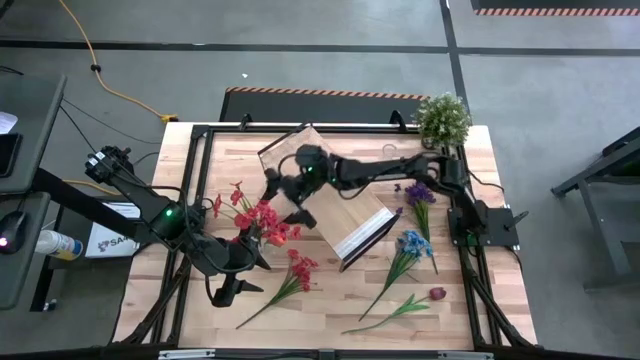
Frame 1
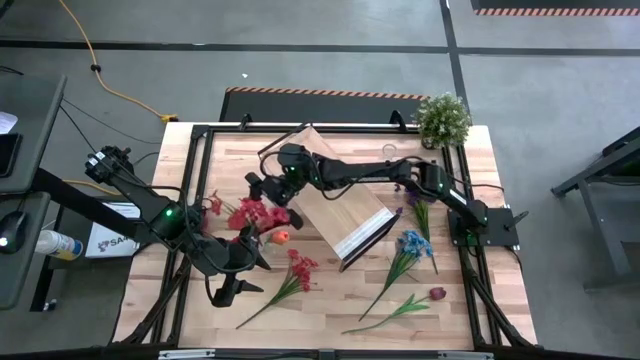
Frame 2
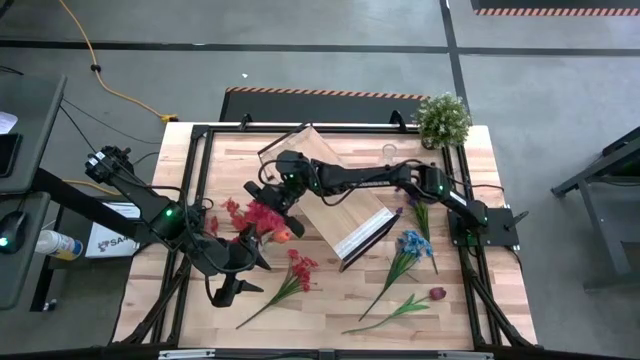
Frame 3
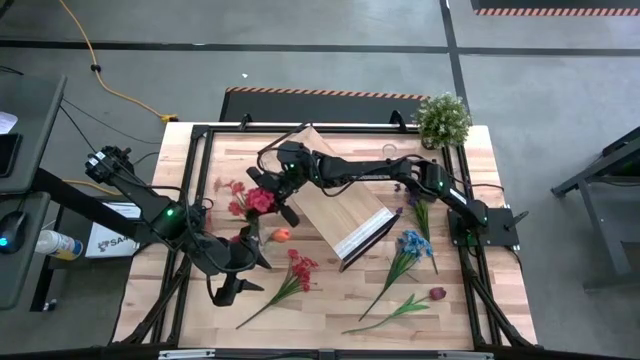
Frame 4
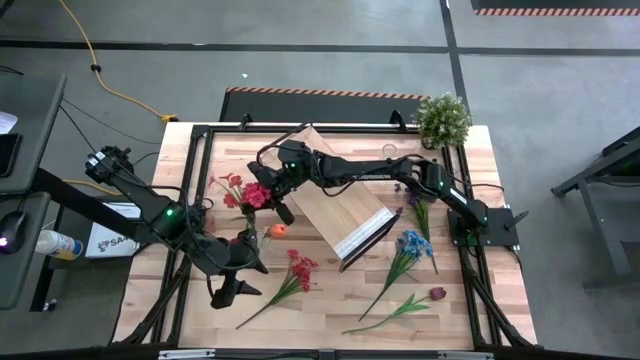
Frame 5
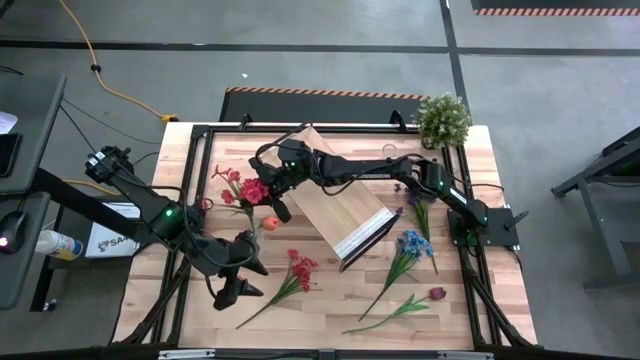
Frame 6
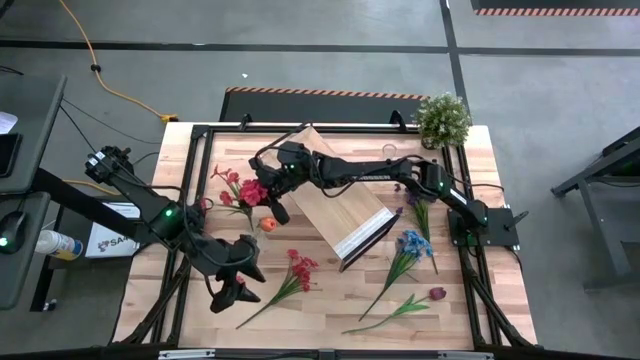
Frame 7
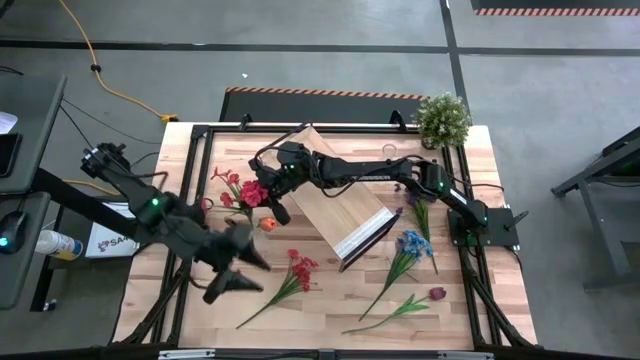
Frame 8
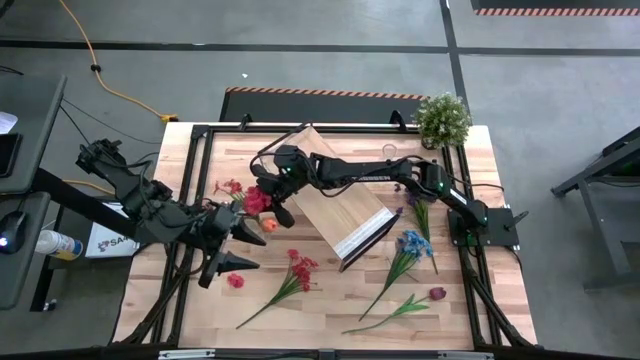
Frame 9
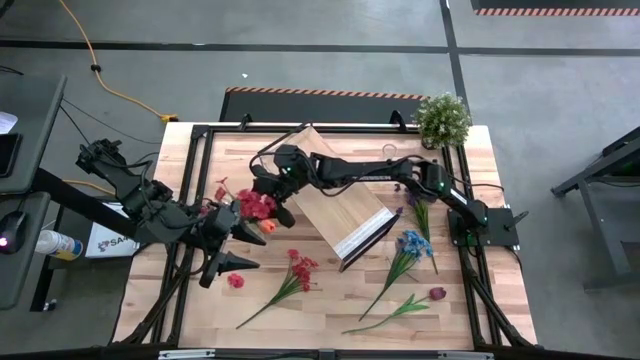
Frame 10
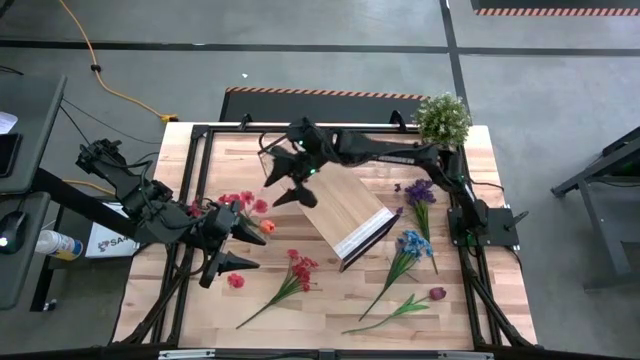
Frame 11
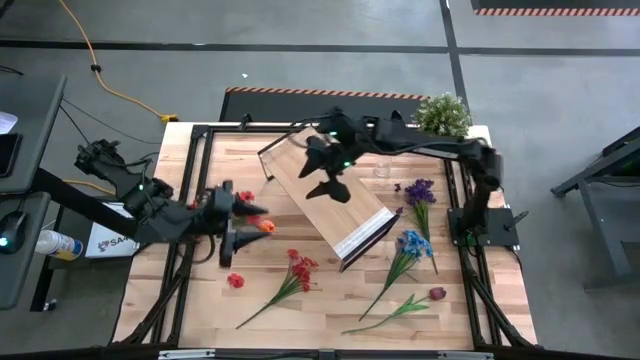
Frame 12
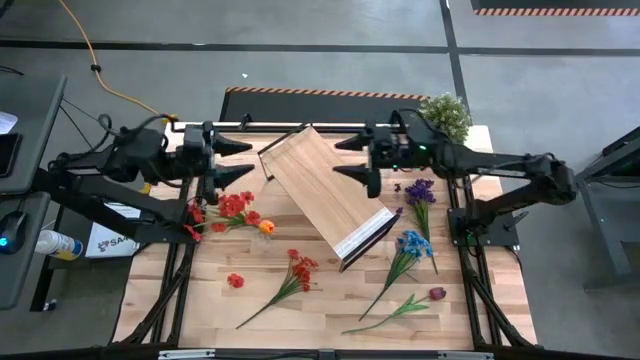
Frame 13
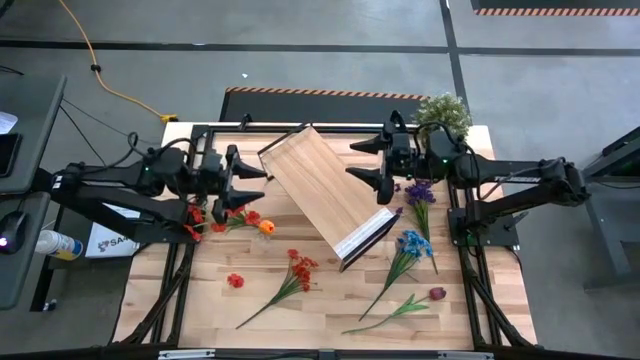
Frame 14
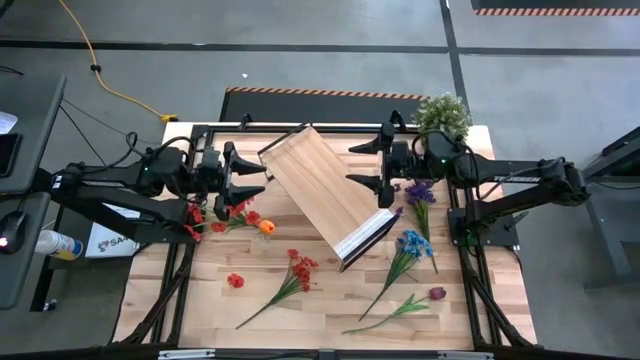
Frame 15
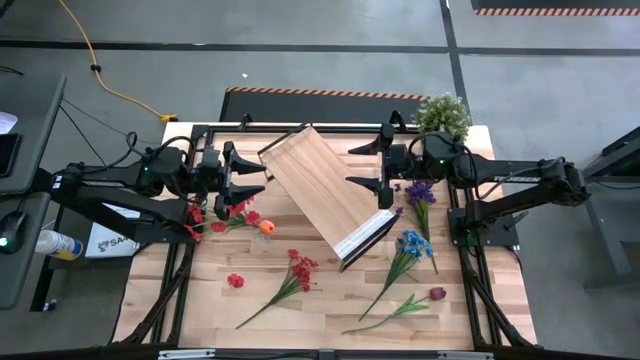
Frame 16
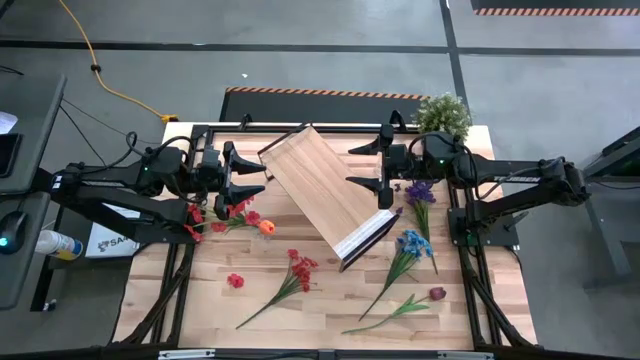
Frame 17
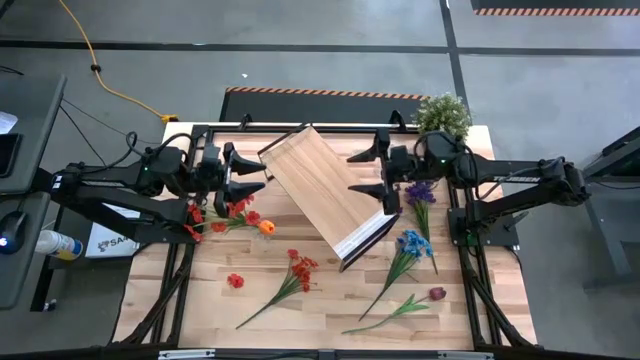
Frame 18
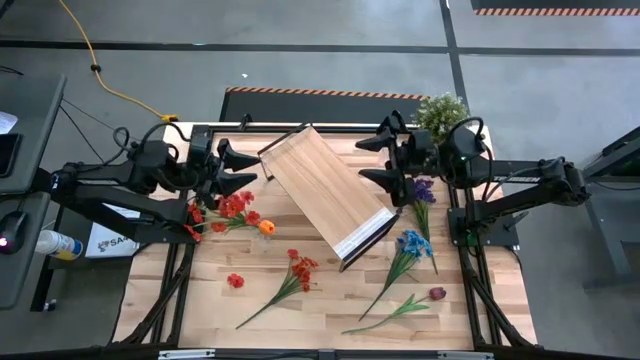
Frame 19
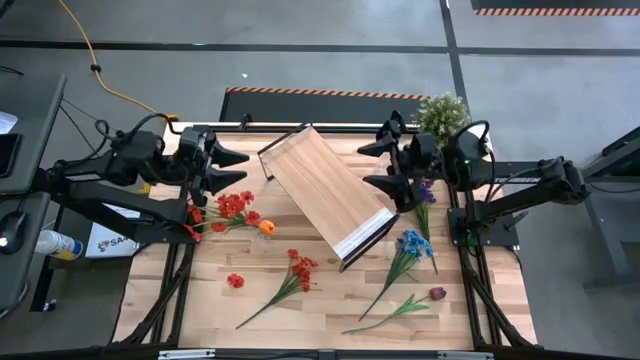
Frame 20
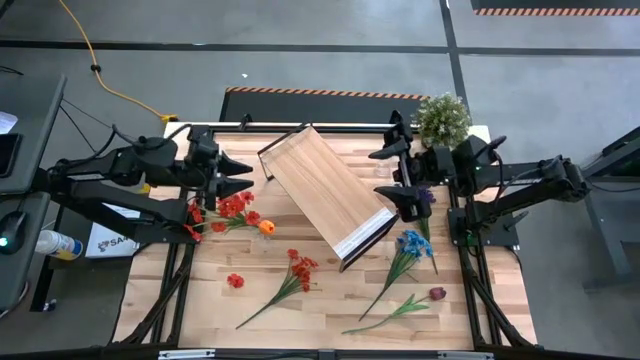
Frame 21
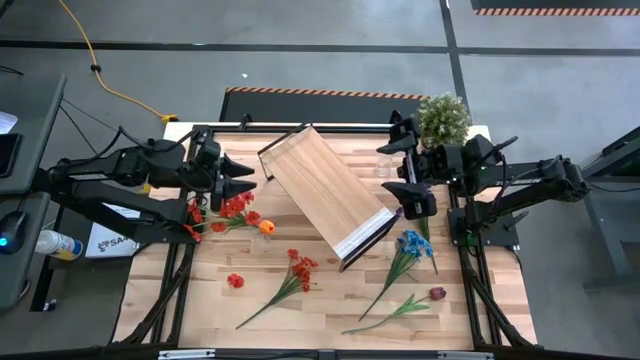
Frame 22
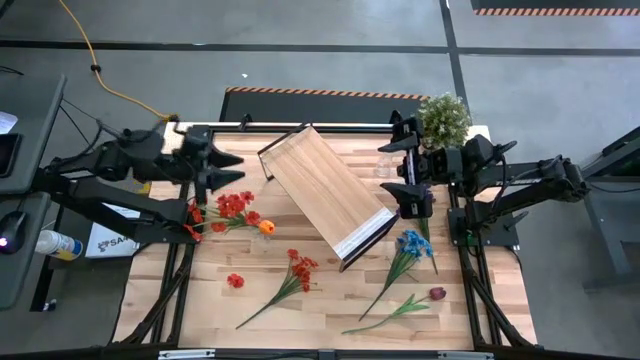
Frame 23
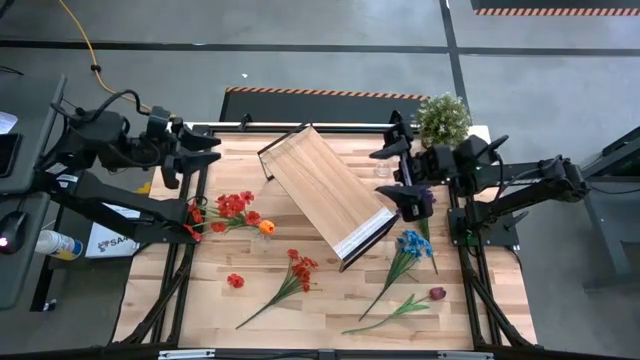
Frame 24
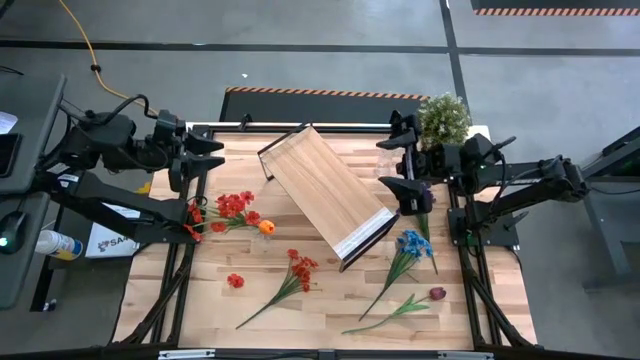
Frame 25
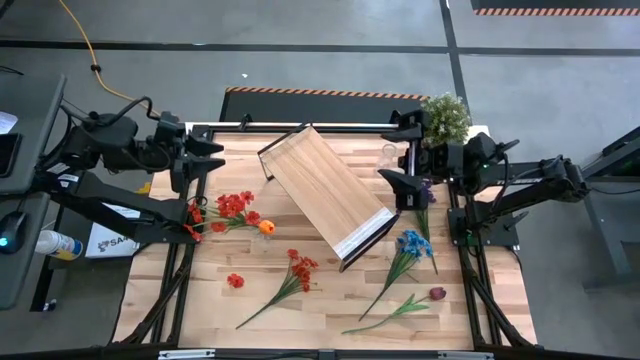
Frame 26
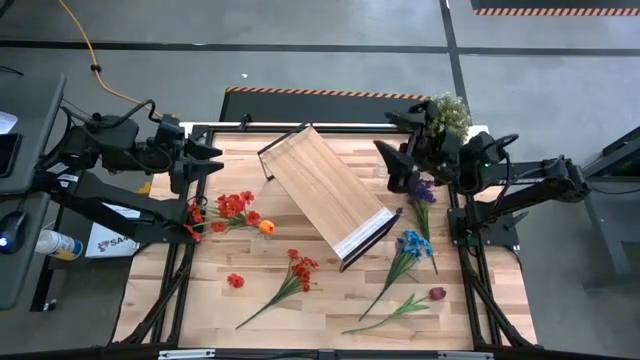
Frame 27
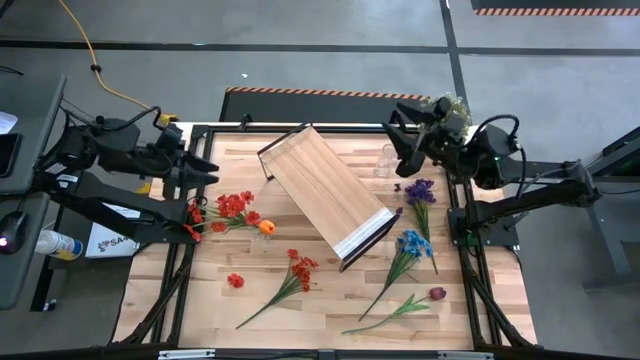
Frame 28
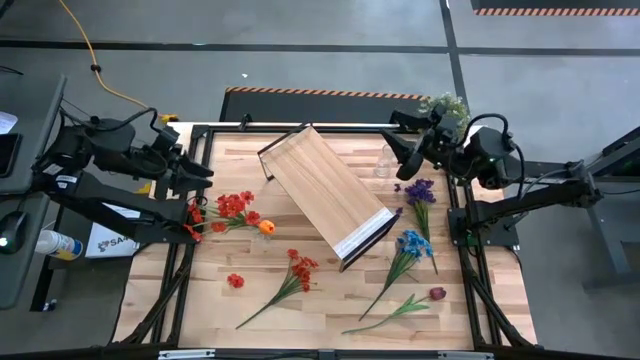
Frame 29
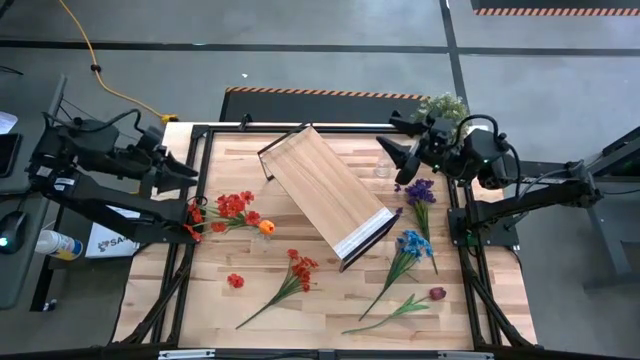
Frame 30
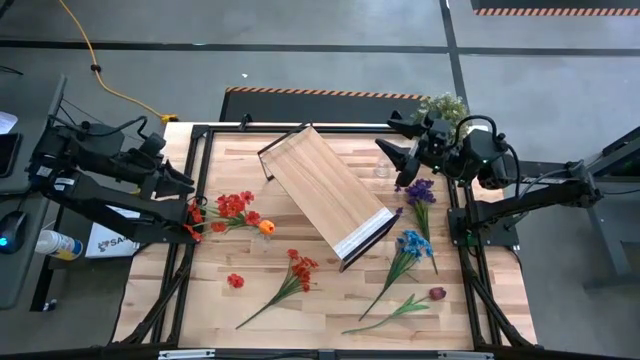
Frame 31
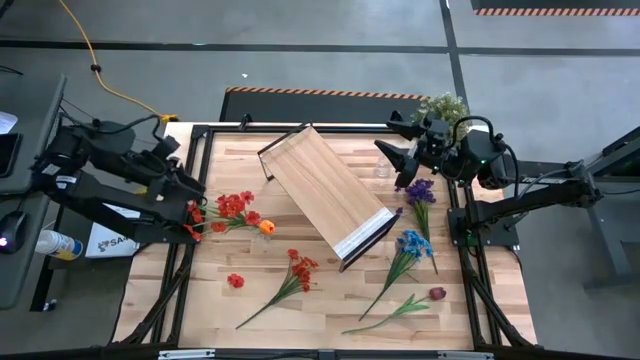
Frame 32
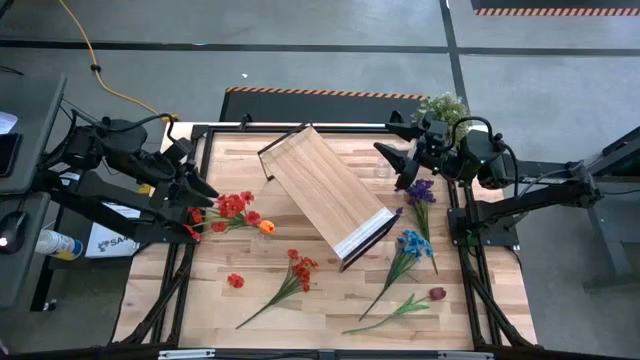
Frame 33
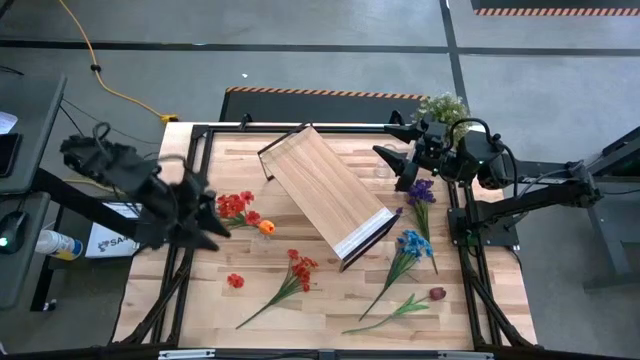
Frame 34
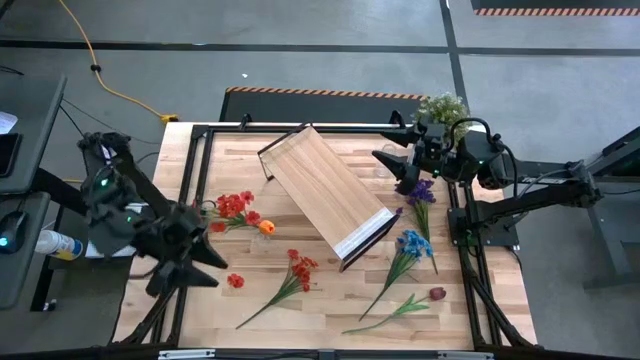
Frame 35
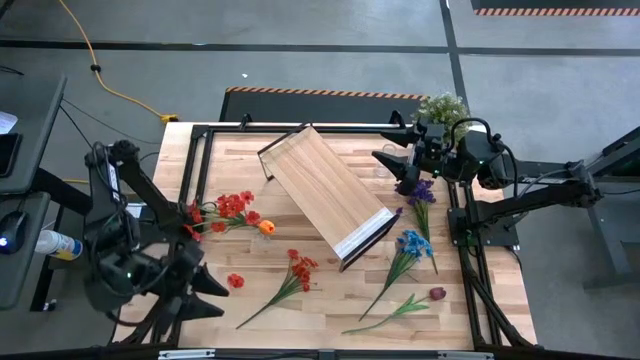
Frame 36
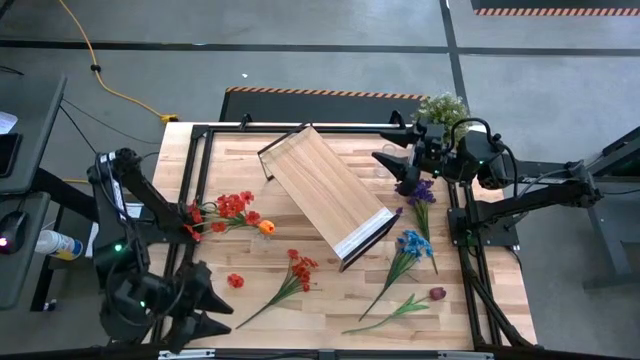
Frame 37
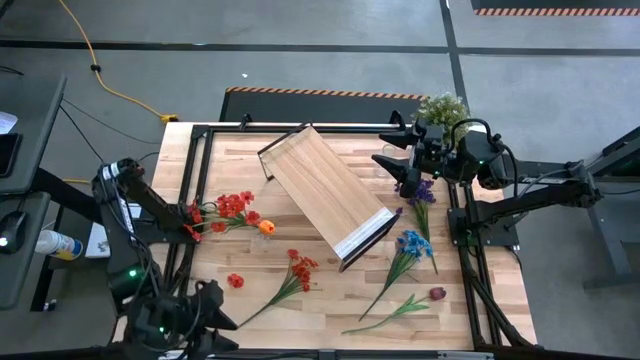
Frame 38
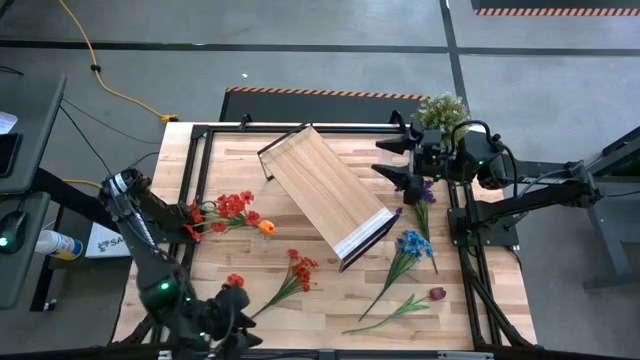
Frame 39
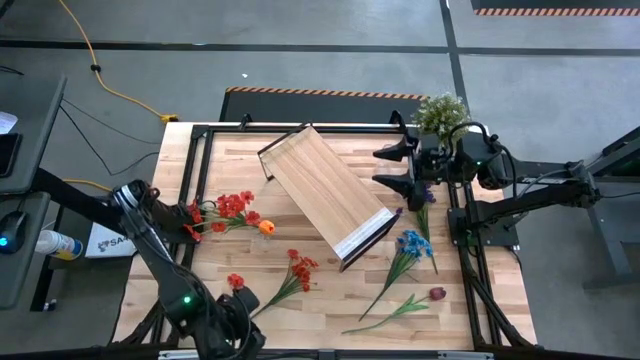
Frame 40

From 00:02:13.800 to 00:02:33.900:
Task: Pick and place flowers into a vace then onto a shelf
Put the red flowers into the bottom transparent vase

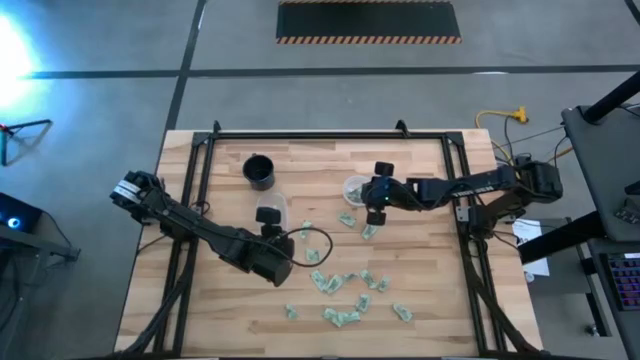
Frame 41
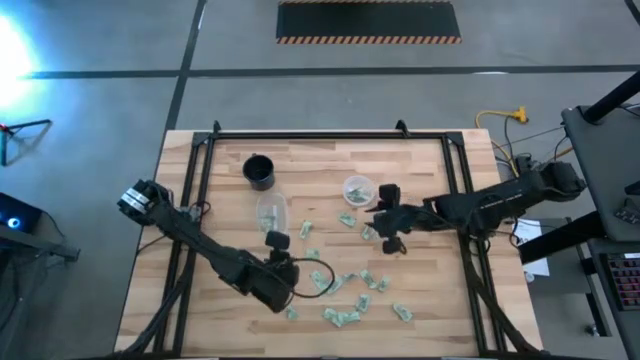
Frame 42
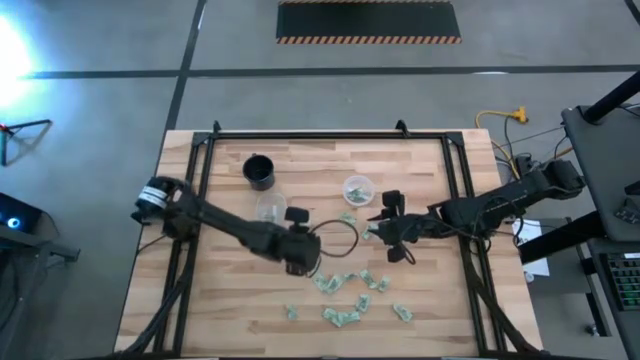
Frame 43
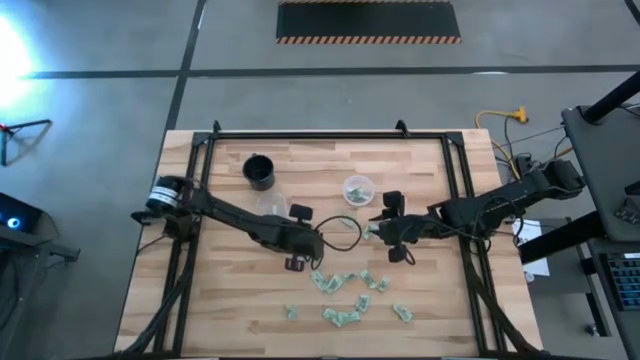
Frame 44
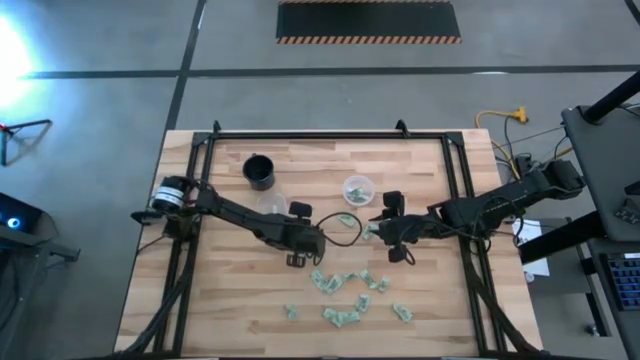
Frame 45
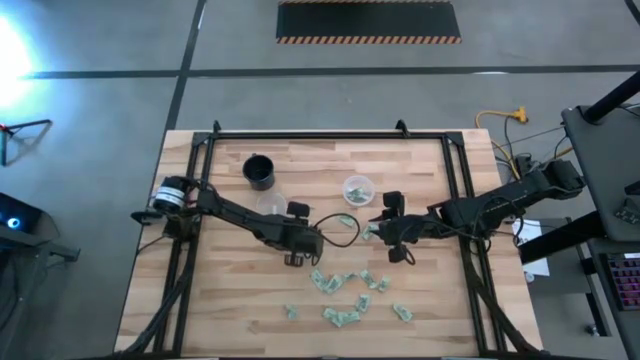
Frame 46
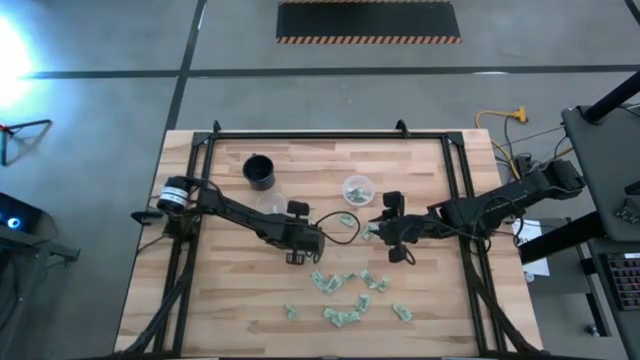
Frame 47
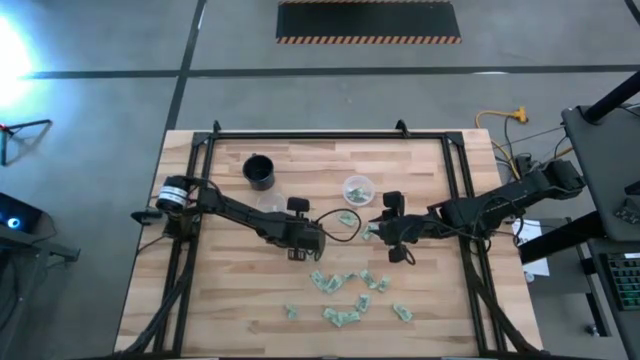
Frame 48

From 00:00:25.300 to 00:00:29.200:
Task: Pick and place items into bin
Put the stevia packet into the left transparent bin
